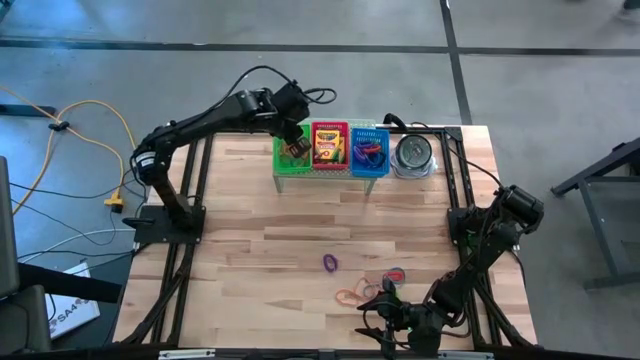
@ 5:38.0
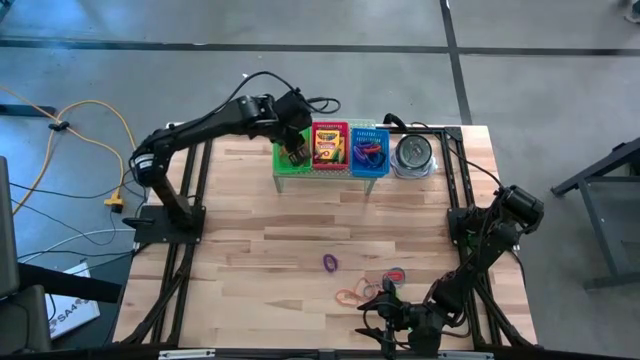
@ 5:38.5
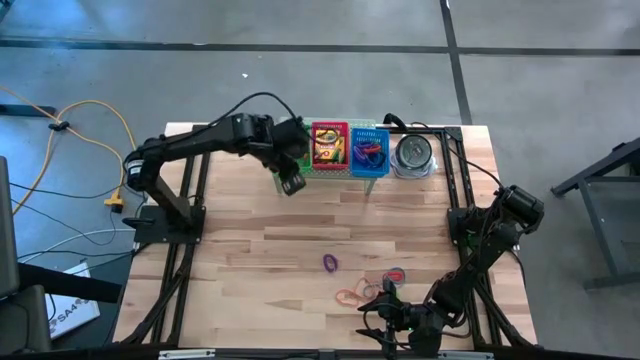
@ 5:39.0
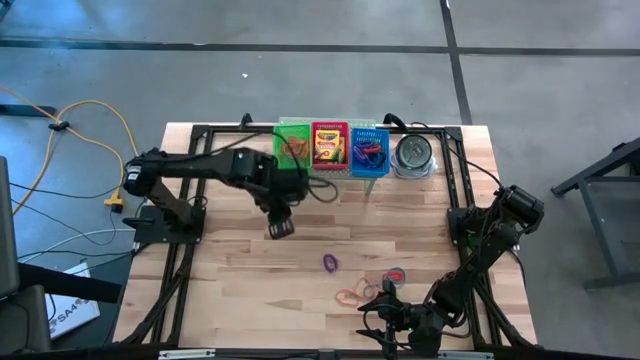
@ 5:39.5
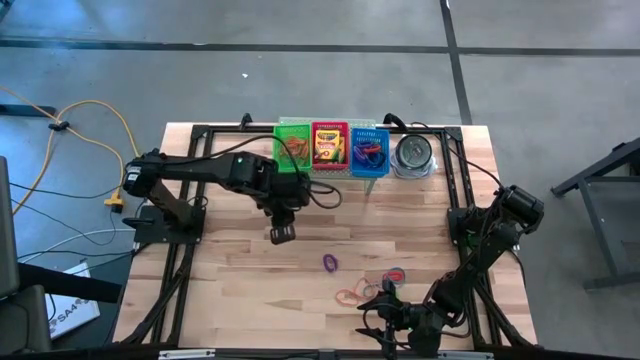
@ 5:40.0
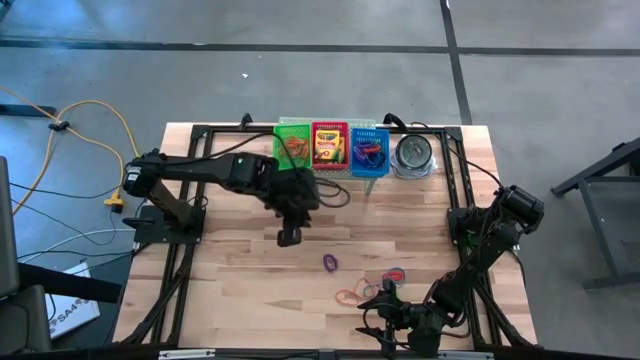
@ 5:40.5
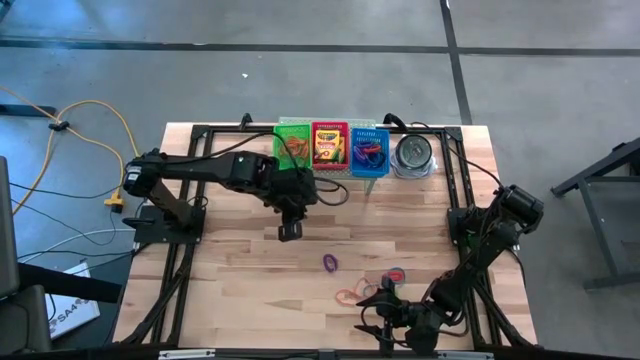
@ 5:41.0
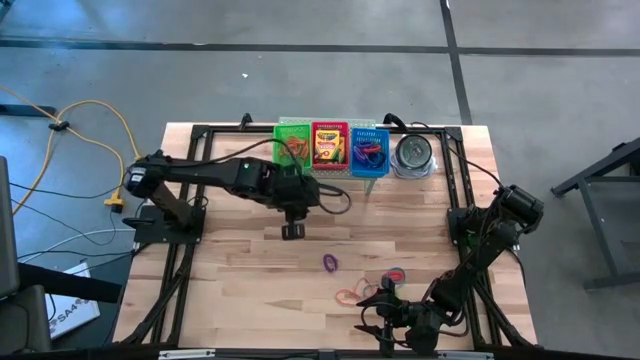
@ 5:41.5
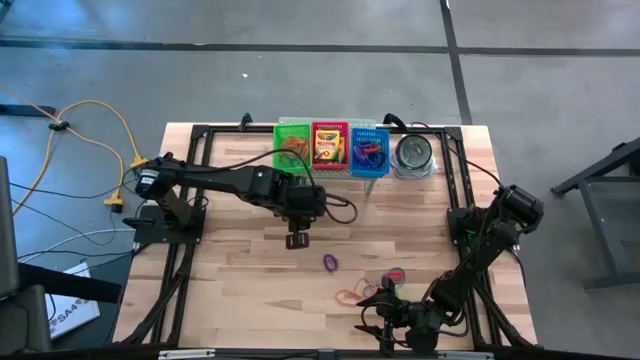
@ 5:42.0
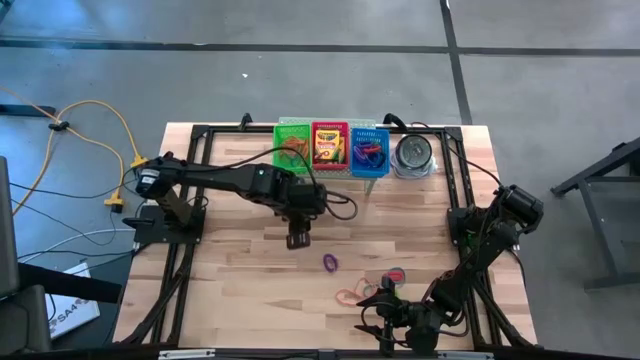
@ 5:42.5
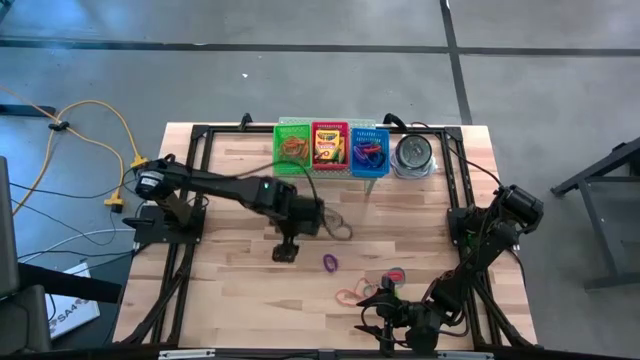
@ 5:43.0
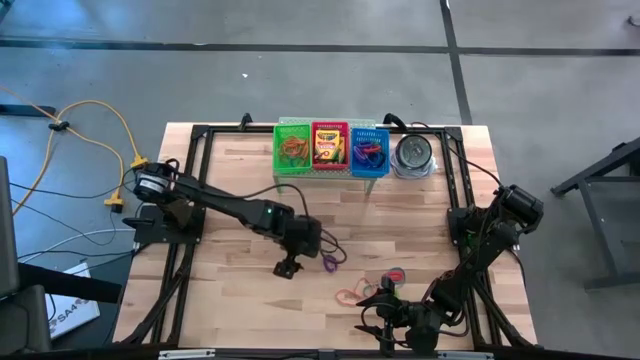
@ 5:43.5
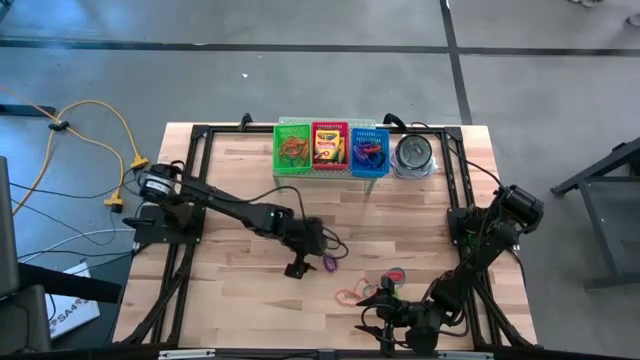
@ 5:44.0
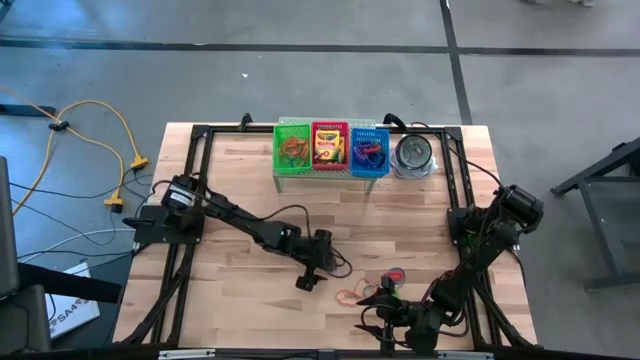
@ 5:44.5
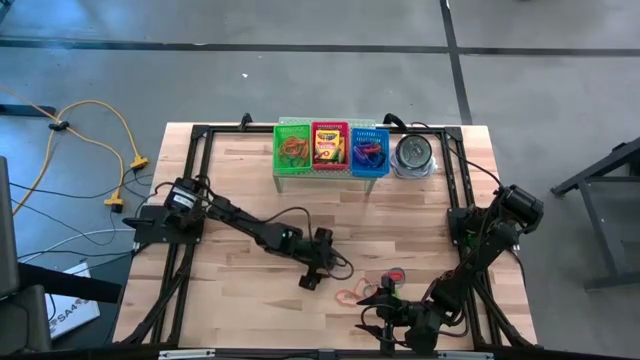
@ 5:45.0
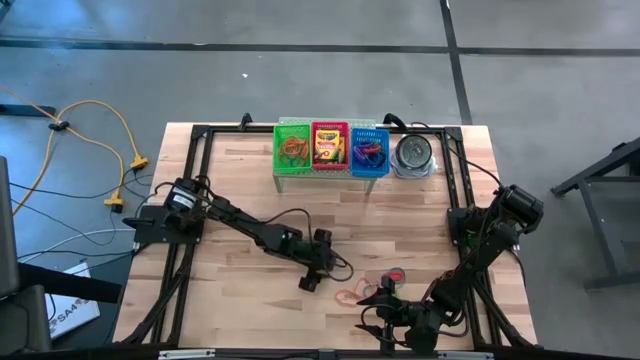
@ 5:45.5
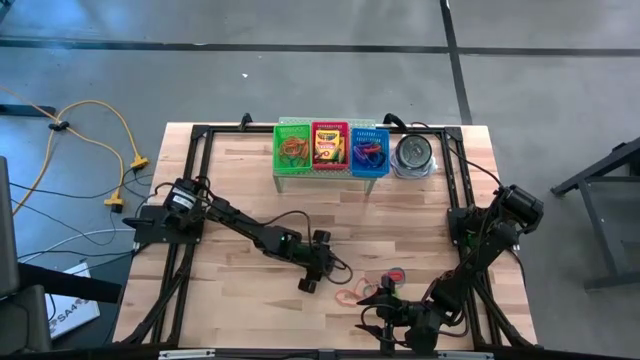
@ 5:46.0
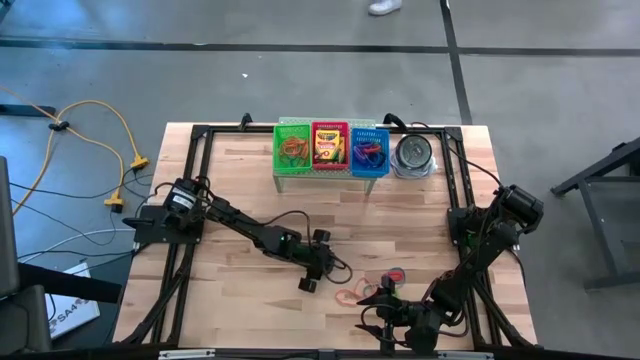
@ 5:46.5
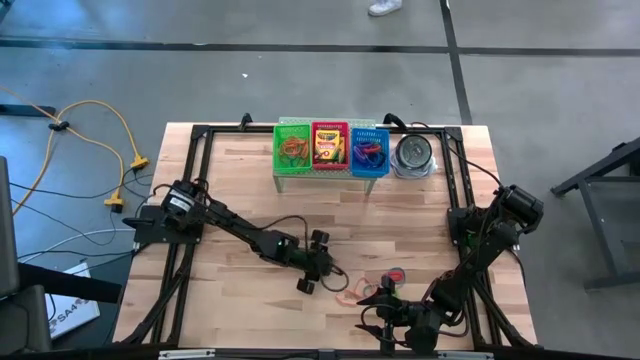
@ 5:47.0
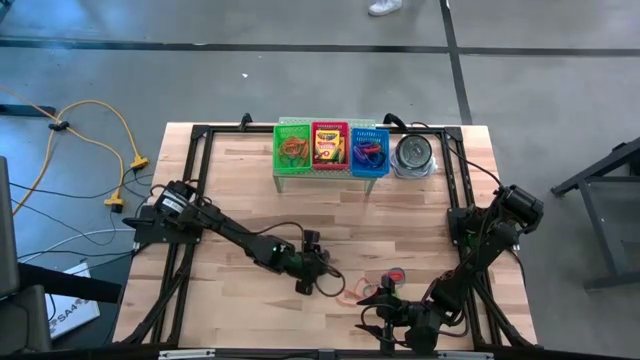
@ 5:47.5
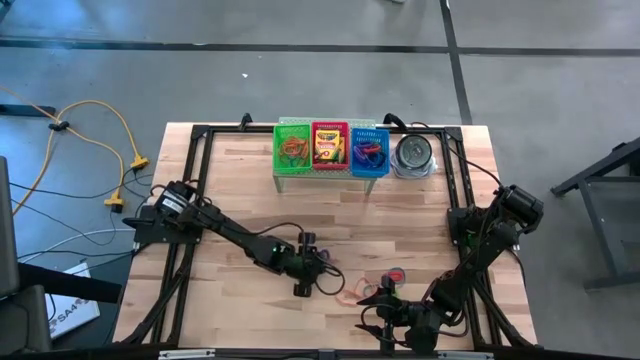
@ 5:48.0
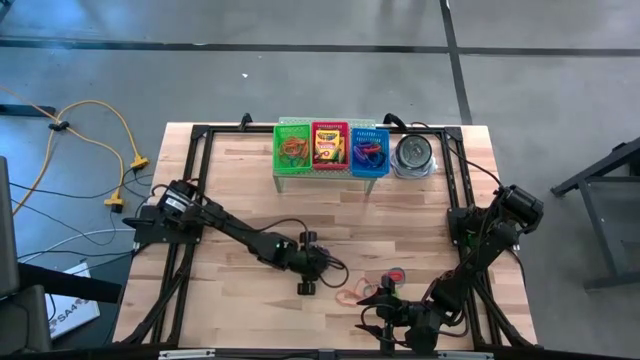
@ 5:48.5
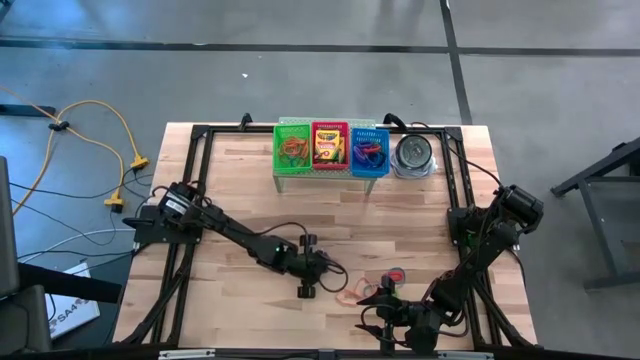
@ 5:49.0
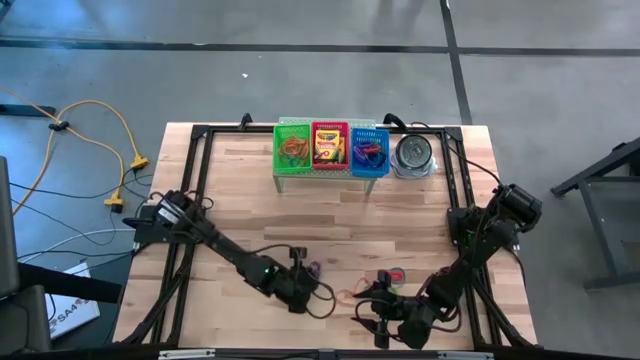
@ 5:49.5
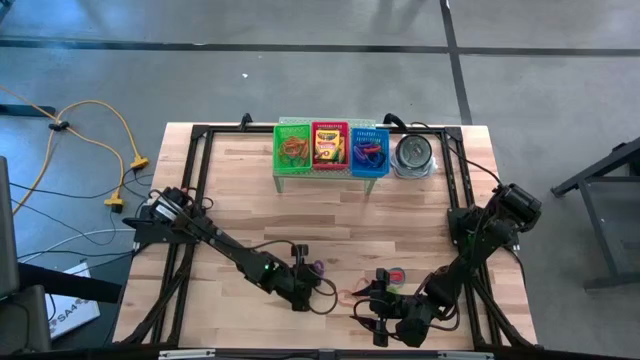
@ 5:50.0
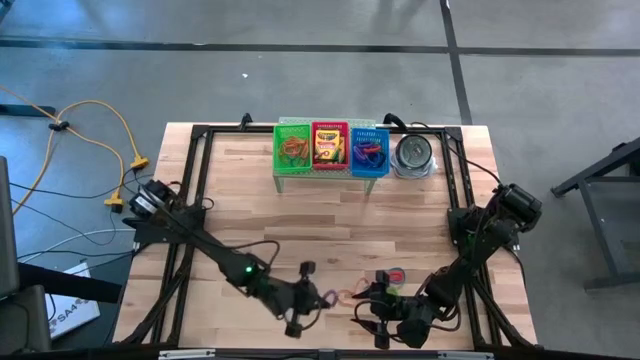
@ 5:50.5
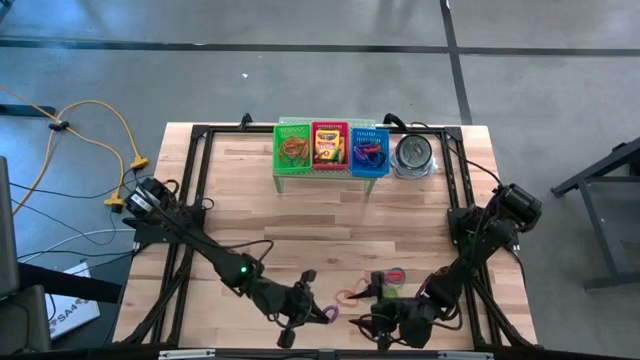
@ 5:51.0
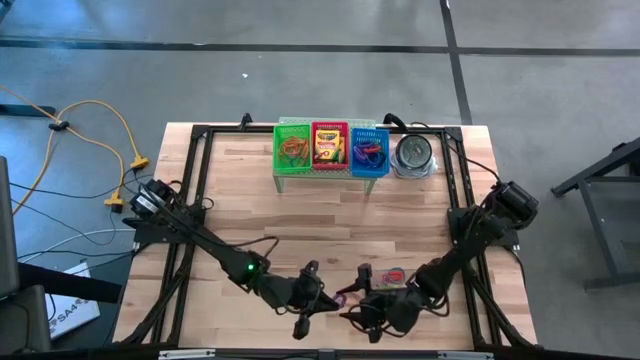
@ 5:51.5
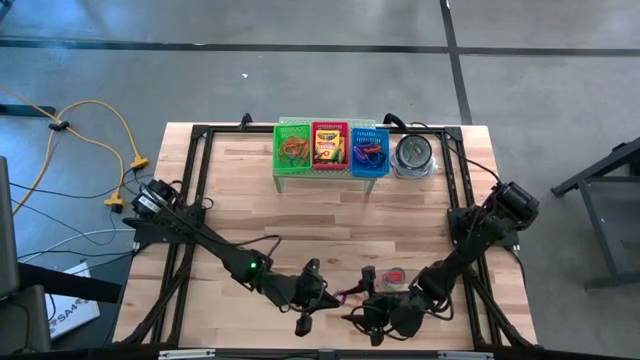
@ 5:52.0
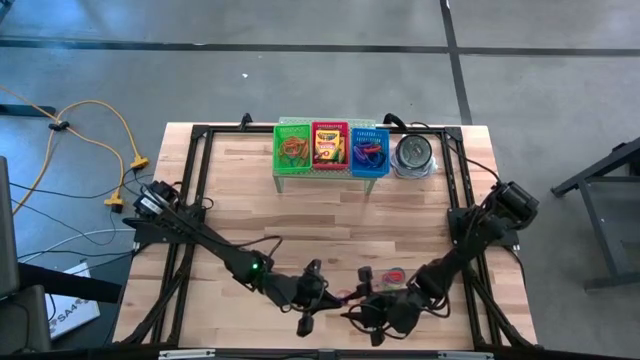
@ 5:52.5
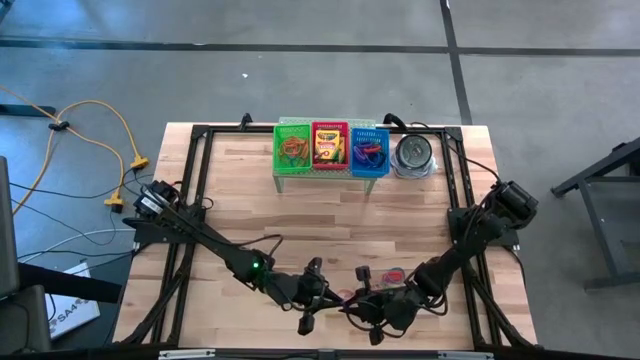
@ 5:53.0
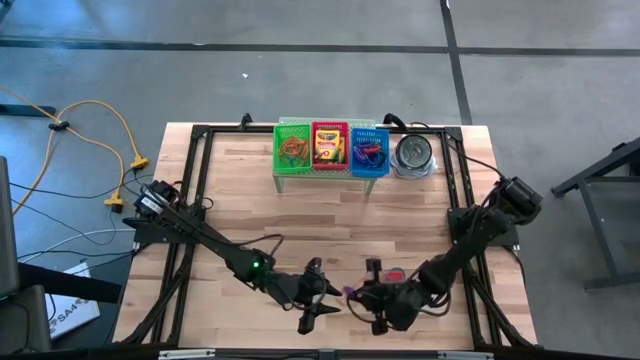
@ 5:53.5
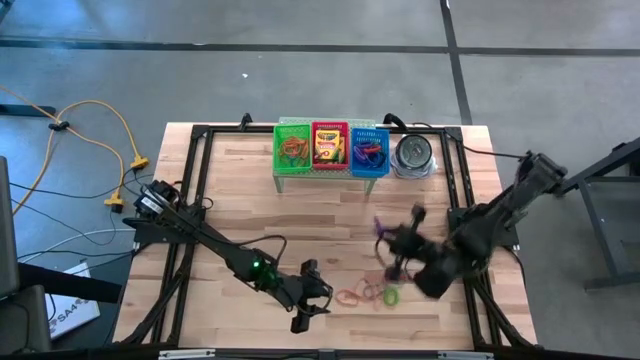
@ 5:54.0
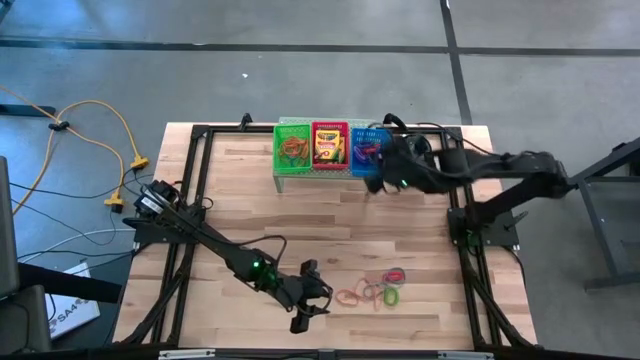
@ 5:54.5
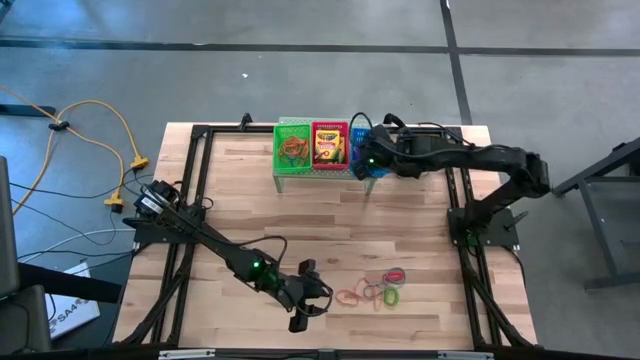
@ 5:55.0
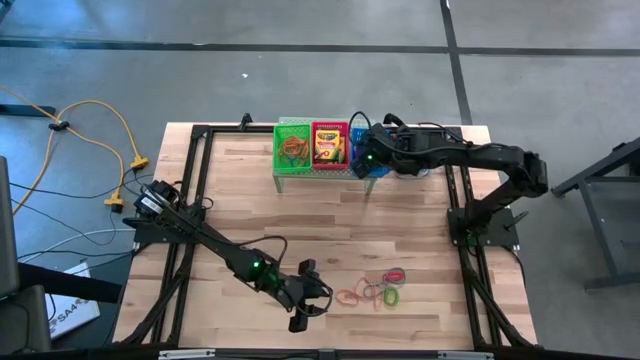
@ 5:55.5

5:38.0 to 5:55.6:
Task: Pick & Place Office Desk Supplies
Put the violet spring keychain into the blue bin on the shelf
